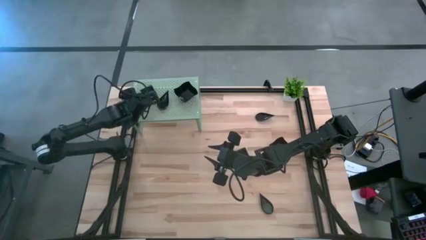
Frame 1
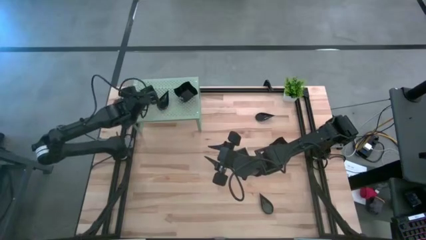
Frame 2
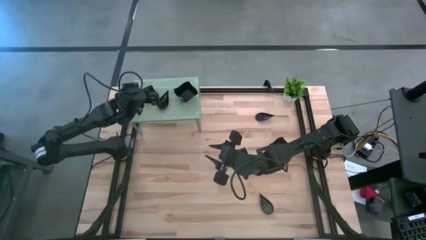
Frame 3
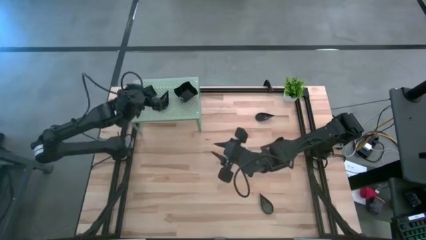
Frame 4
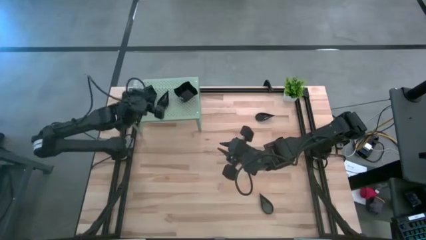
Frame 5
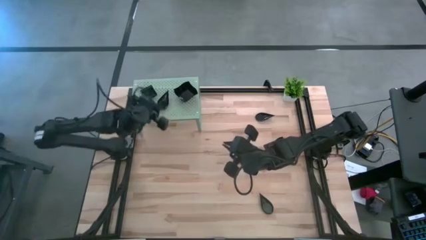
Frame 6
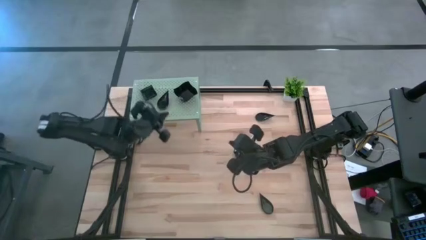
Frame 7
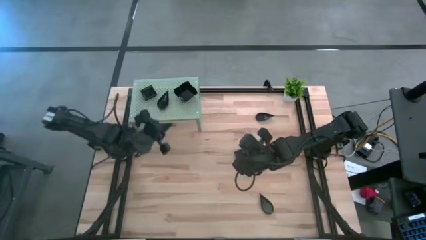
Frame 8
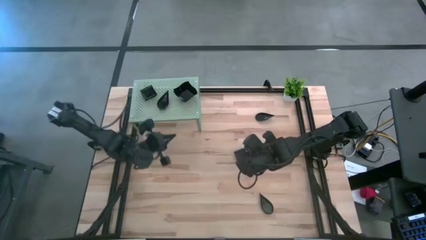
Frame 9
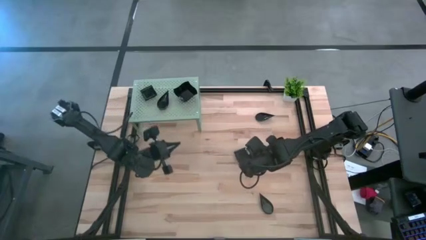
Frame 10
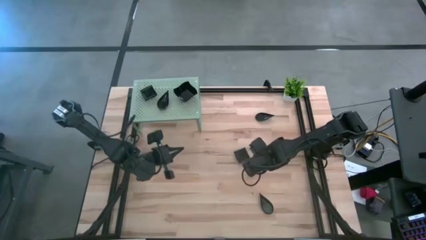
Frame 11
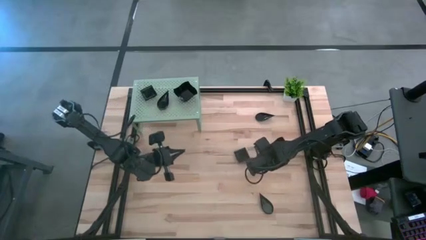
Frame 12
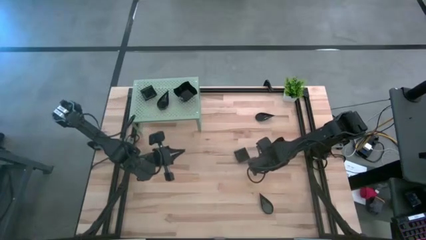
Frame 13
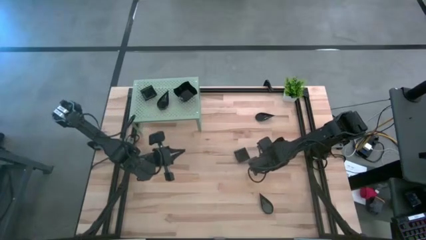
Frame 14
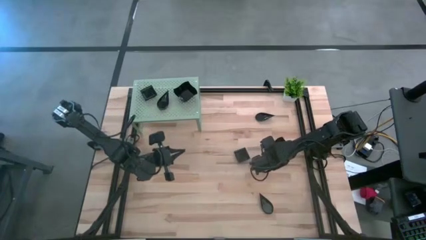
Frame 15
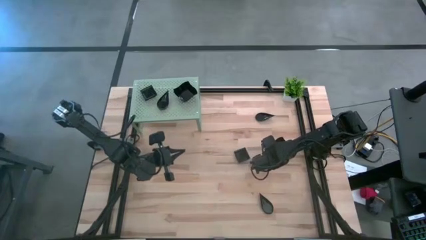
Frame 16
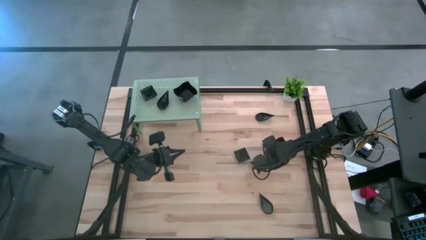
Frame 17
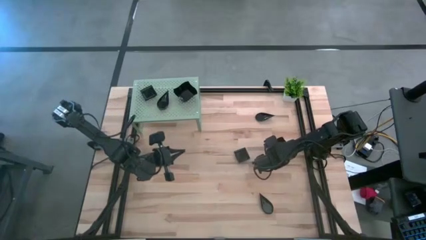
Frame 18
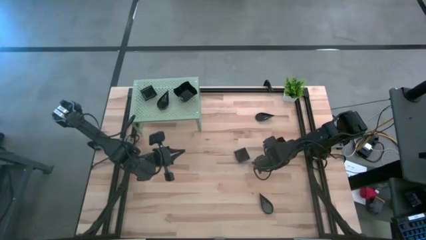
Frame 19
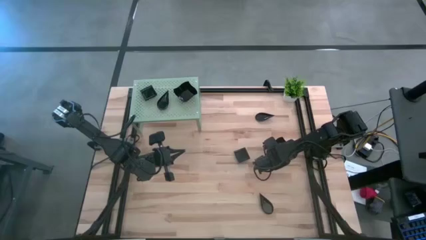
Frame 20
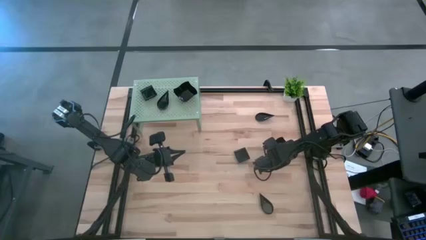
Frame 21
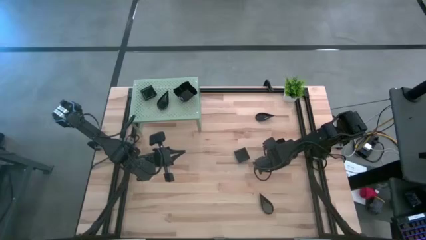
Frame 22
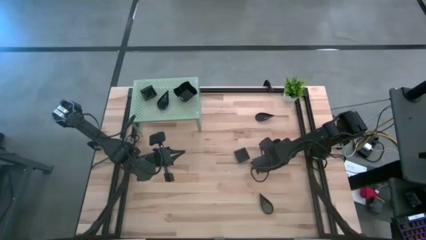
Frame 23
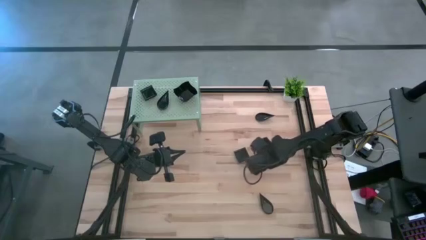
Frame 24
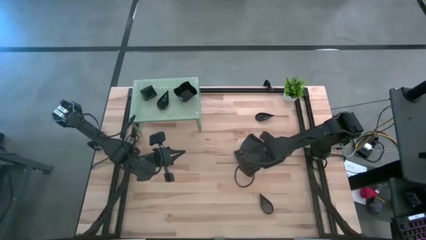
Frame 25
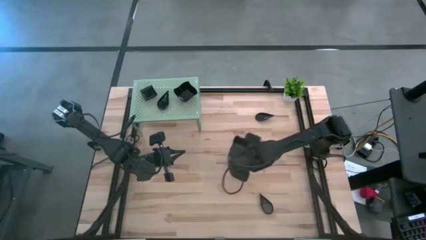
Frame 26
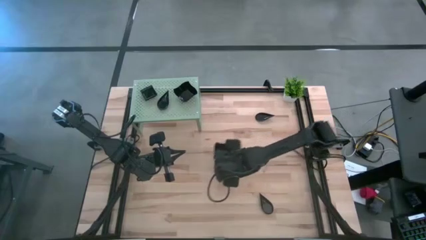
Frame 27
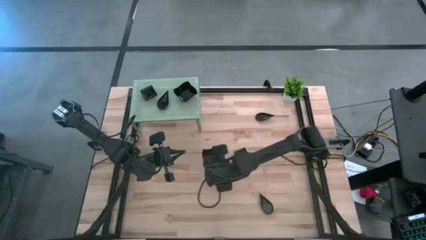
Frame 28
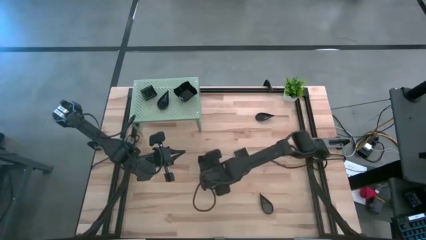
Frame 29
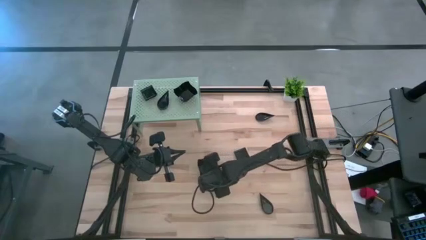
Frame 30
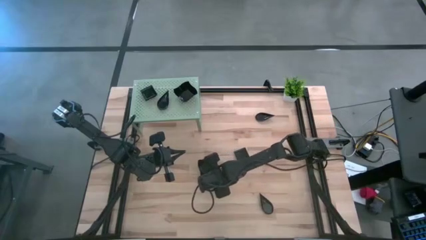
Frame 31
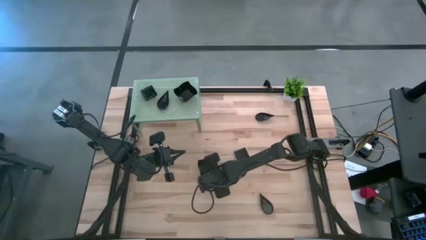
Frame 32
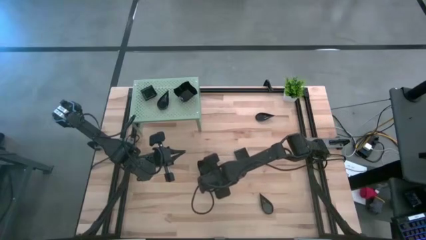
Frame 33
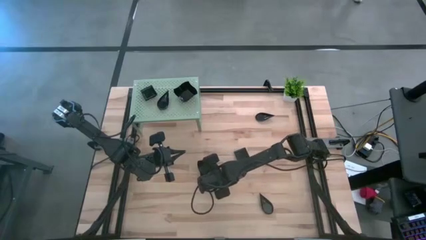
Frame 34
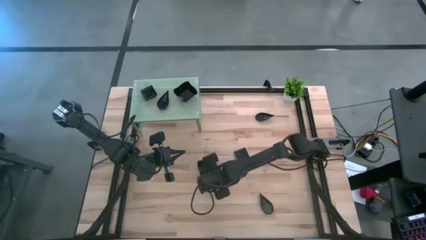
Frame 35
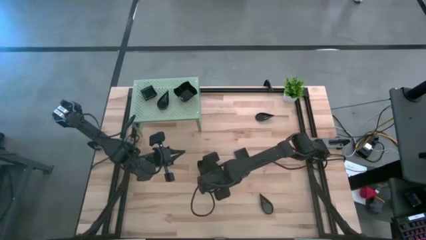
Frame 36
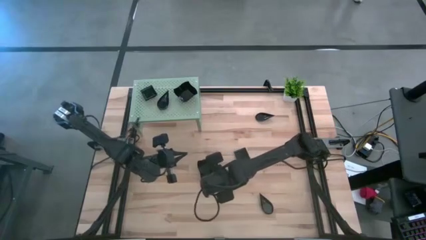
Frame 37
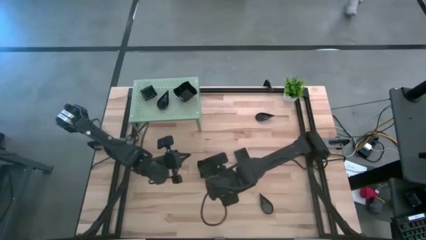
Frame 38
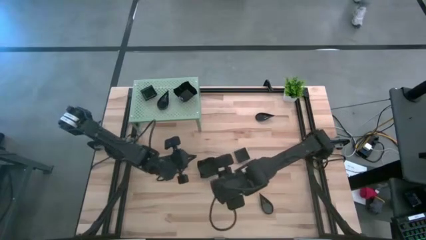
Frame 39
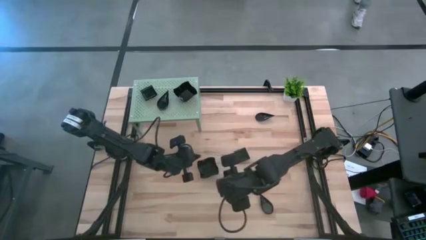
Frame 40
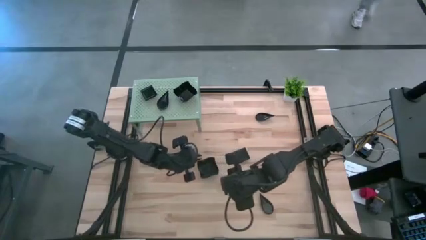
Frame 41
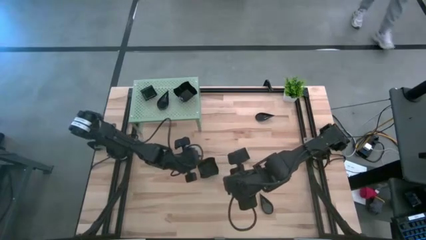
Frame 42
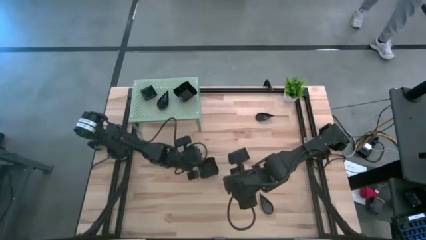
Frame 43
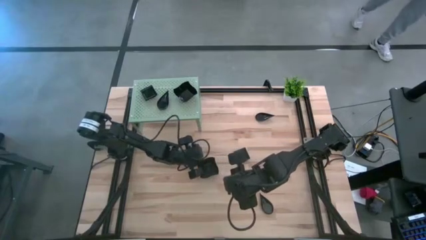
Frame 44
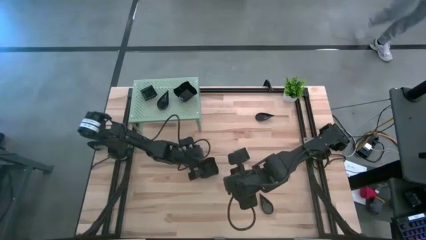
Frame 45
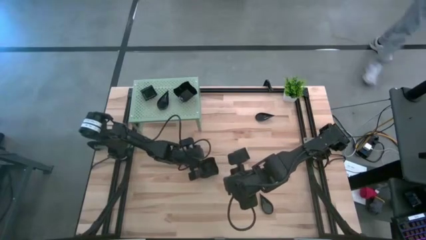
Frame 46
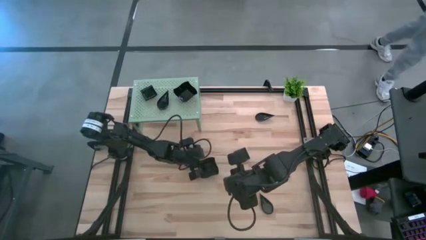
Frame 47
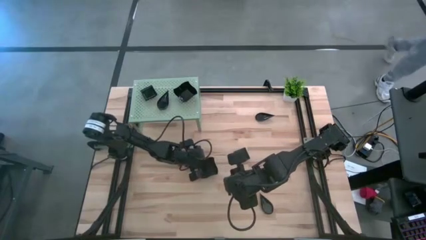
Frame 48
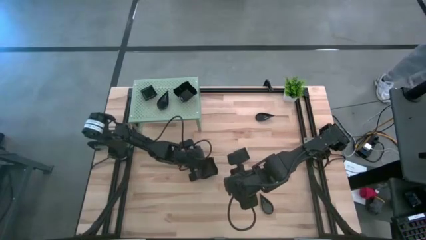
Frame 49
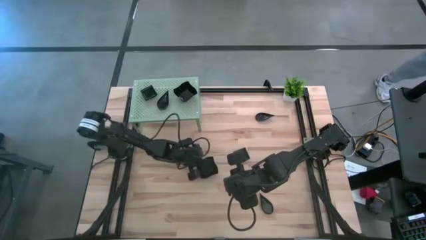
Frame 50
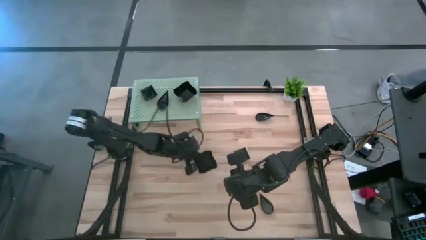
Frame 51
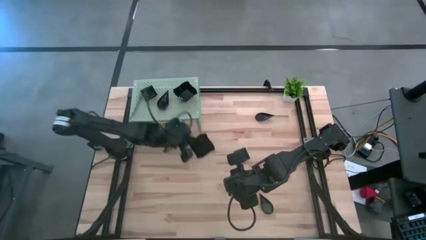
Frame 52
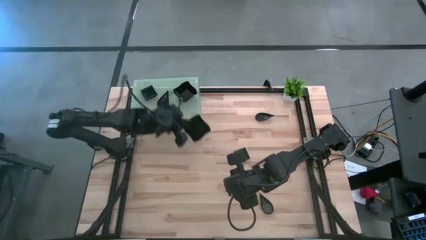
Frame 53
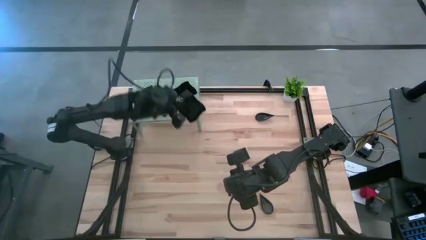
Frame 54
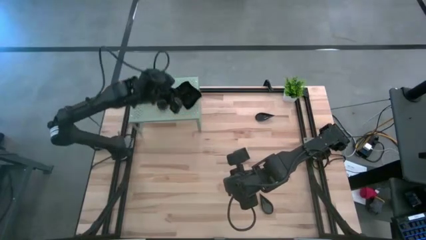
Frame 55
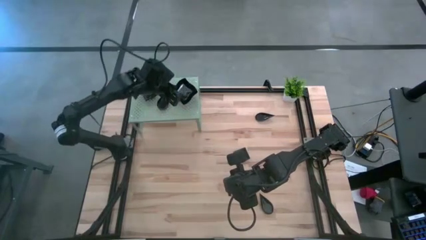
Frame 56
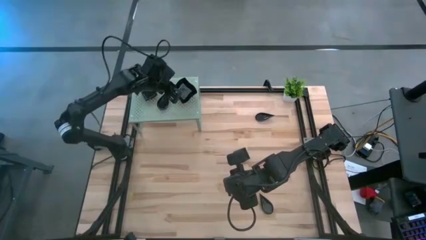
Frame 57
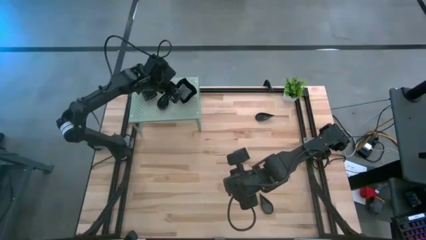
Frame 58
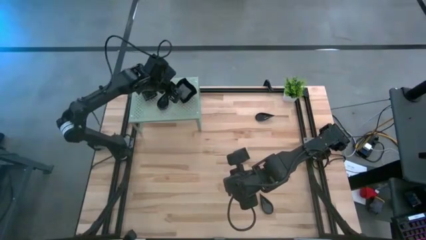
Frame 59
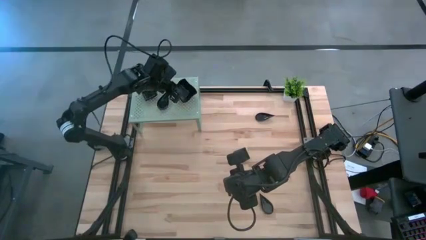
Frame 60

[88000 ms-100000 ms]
Task: Pick & Place Mini shaped plates
Stack the black distorted square plate on top of the black distorted square plate on the shelf
